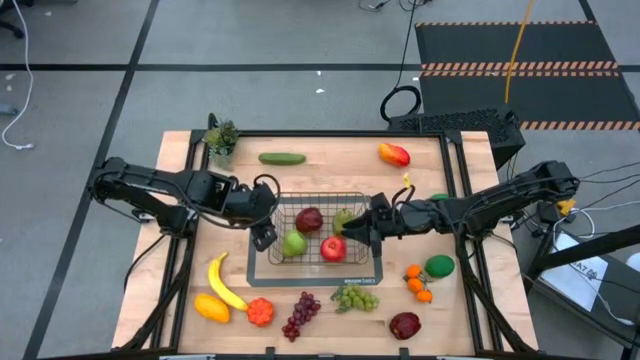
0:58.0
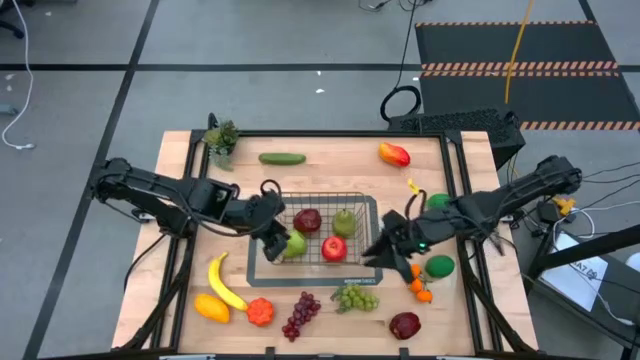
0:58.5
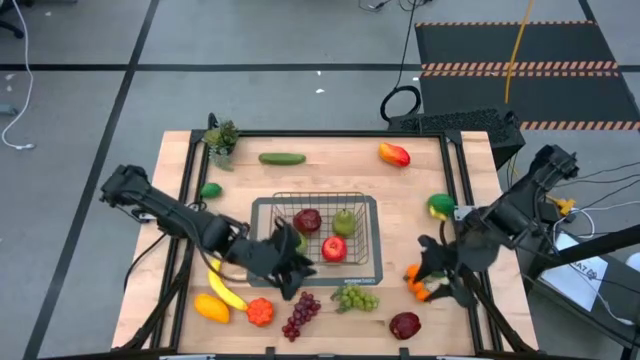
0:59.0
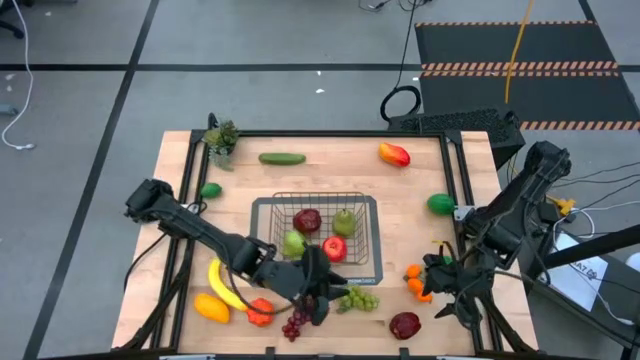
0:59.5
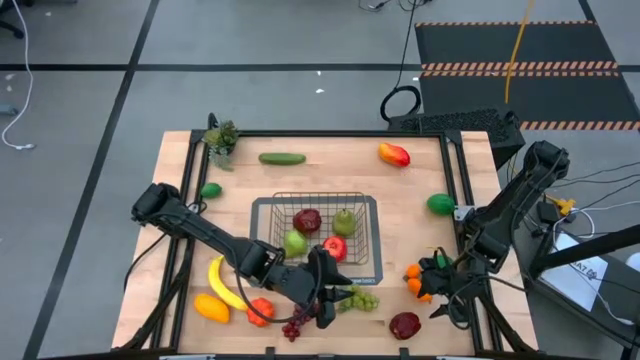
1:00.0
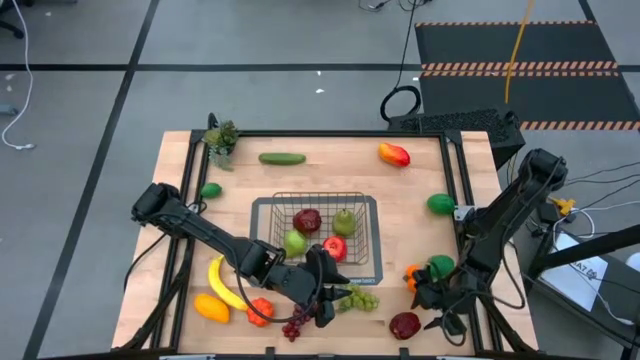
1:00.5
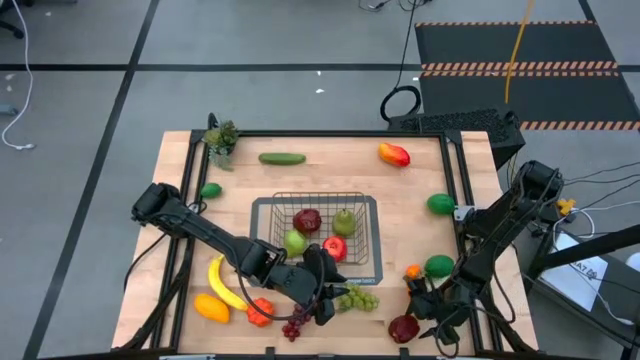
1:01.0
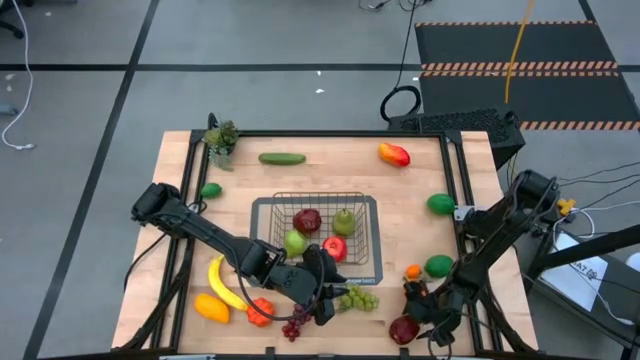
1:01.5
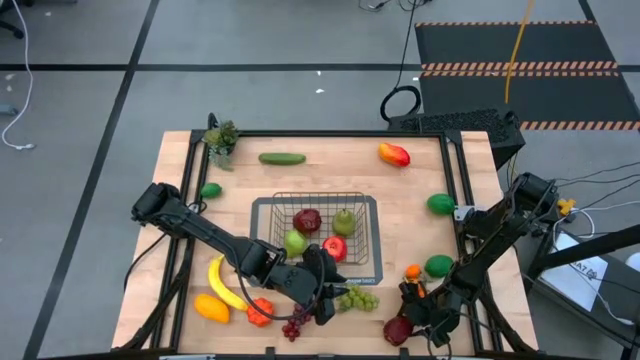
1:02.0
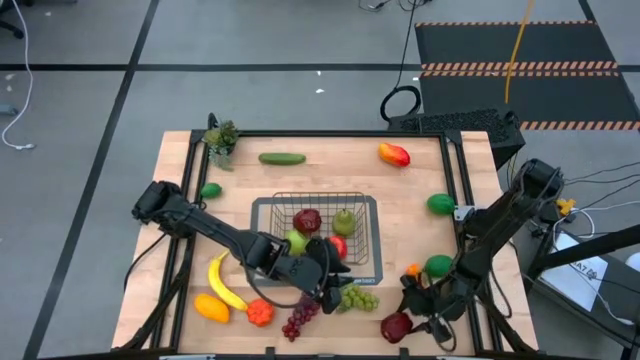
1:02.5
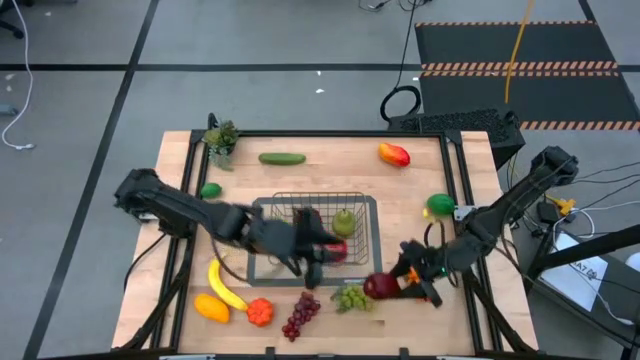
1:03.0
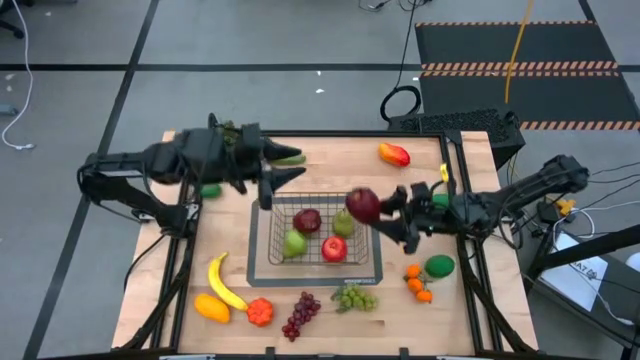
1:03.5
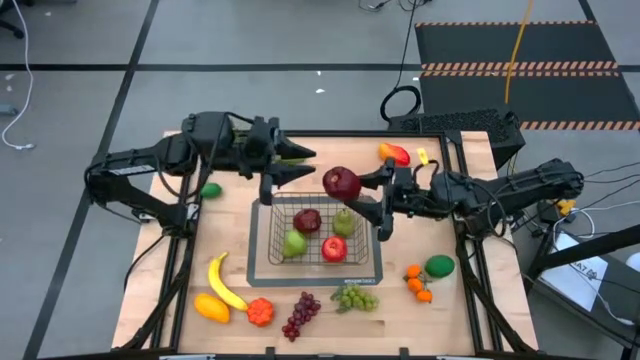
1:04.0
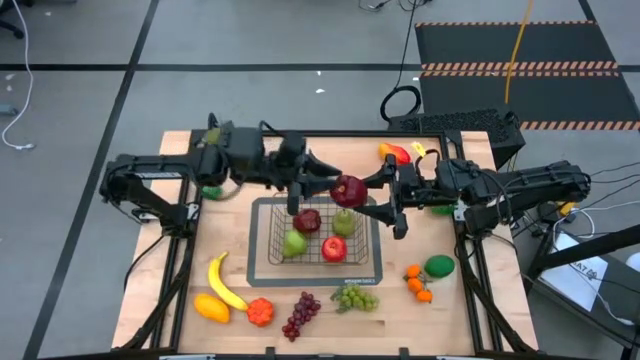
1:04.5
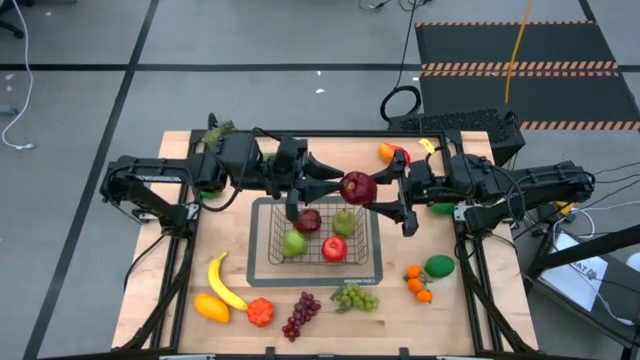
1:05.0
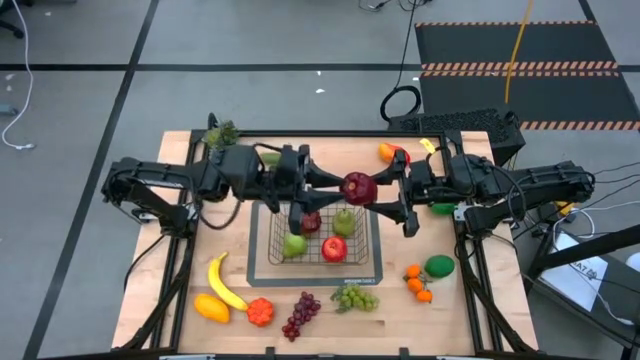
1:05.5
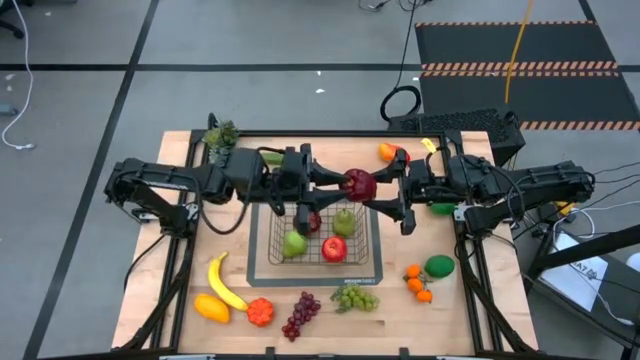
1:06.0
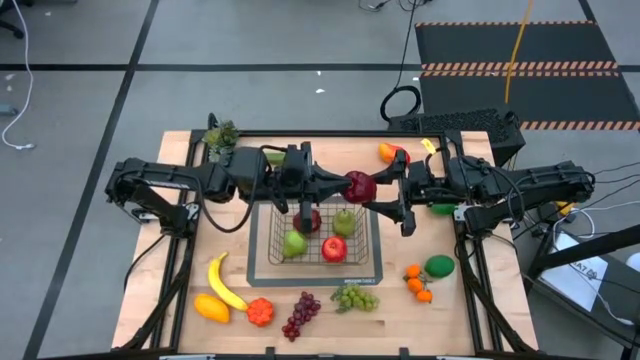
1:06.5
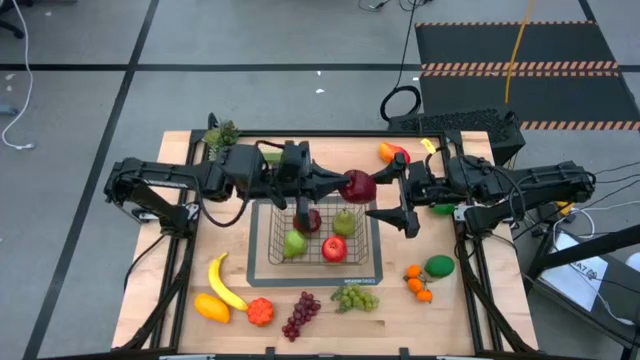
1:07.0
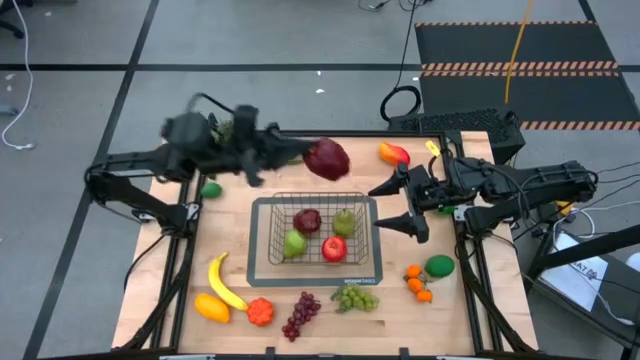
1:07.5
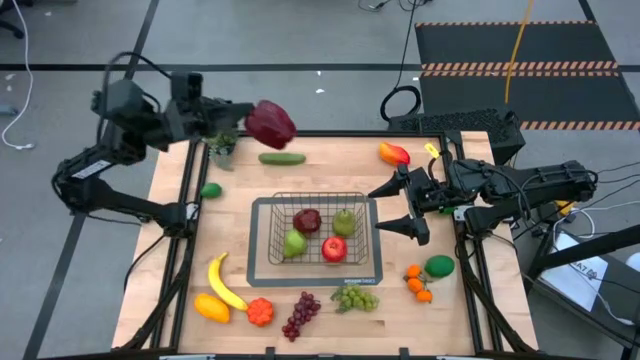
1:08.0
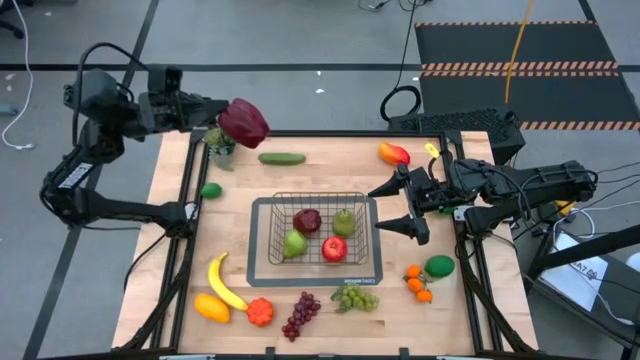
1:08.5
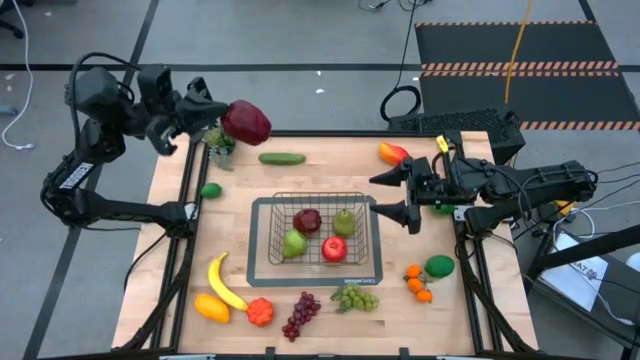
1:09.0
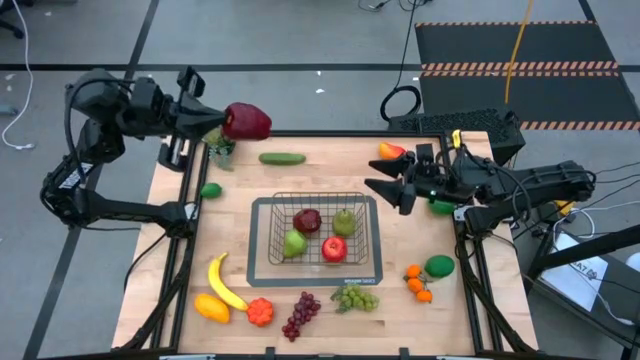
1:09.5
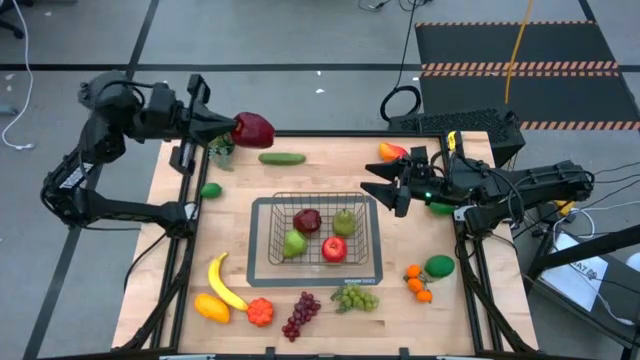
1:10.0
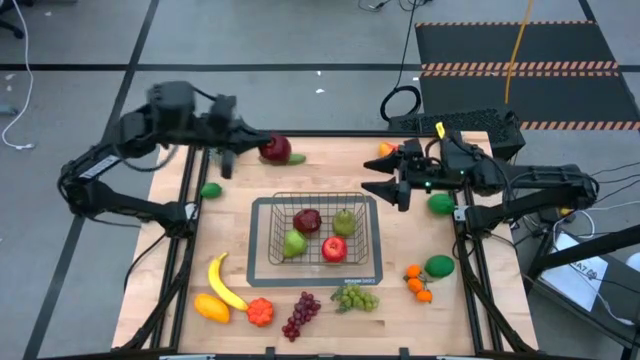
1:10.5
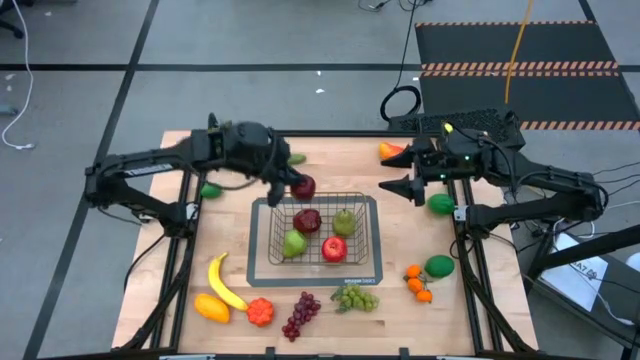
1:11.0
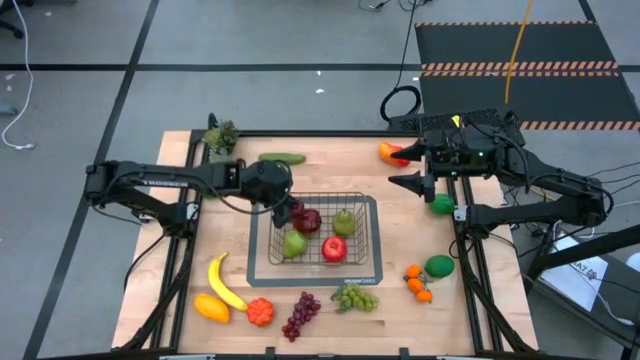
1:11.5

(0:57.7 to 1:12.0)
Task: Build produce basket
Put the dark red apple into the gold wire basket

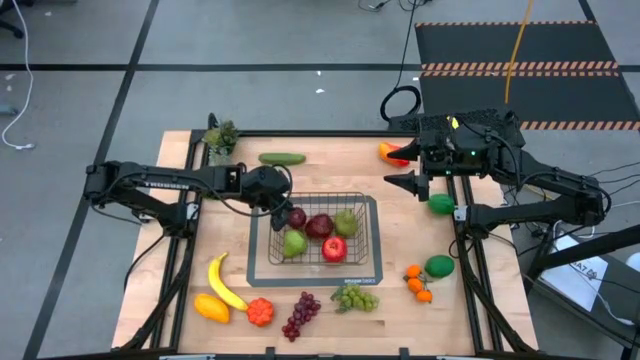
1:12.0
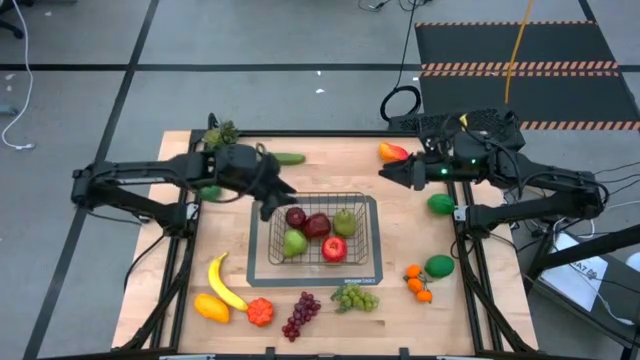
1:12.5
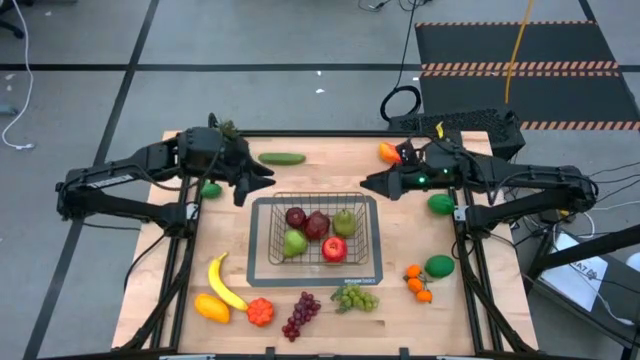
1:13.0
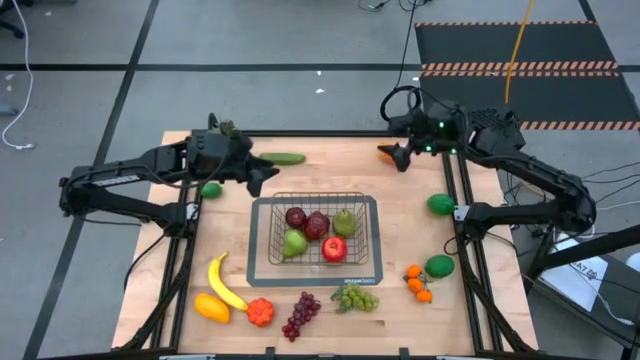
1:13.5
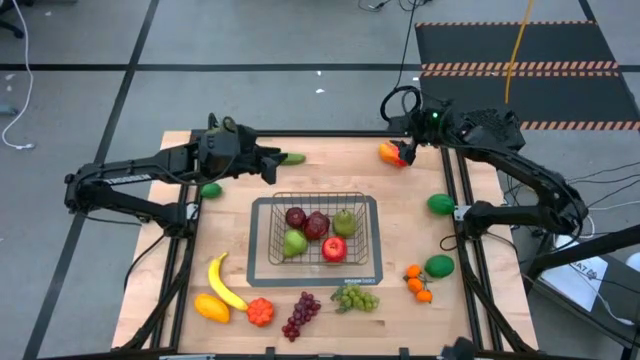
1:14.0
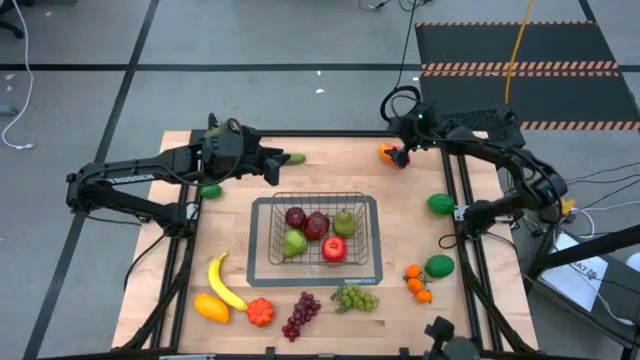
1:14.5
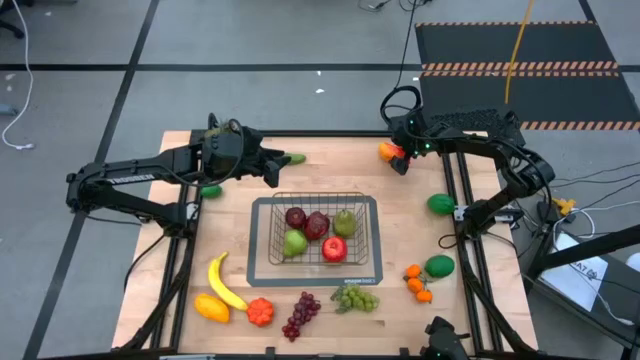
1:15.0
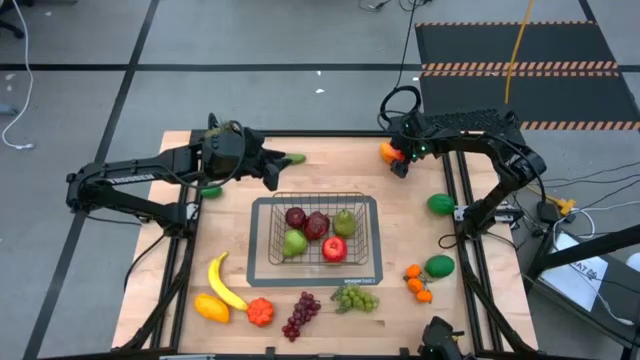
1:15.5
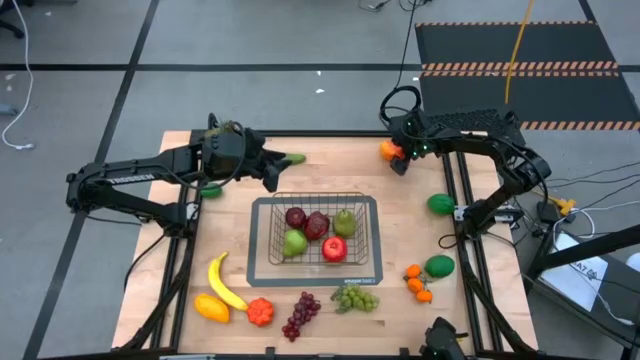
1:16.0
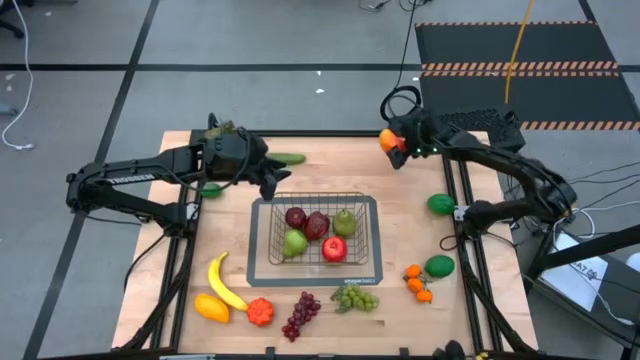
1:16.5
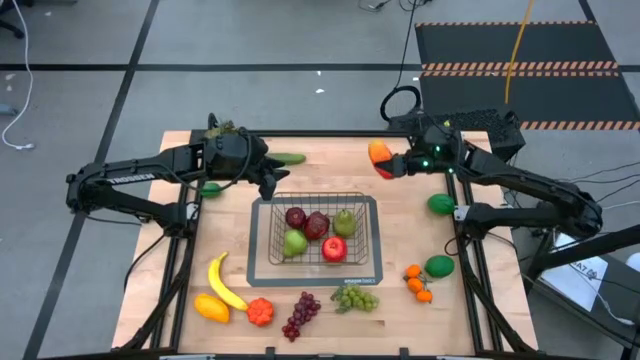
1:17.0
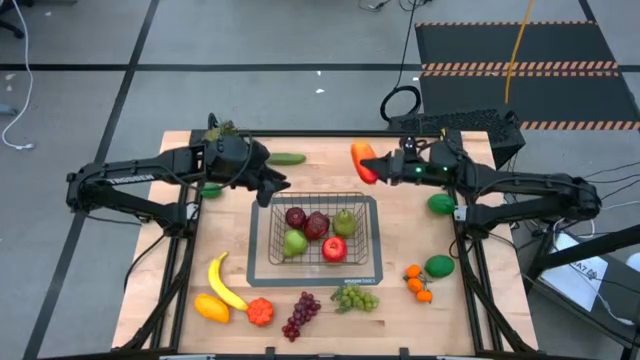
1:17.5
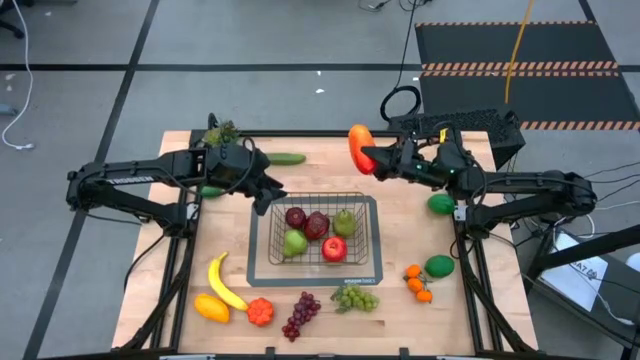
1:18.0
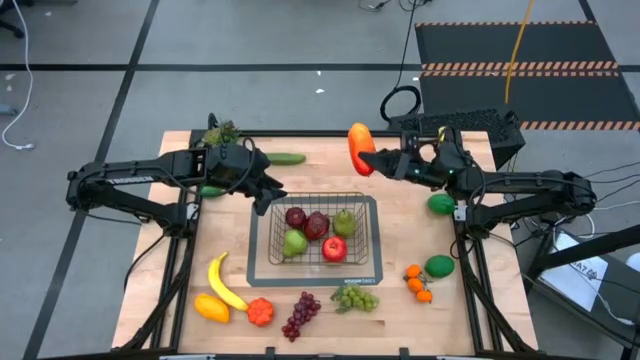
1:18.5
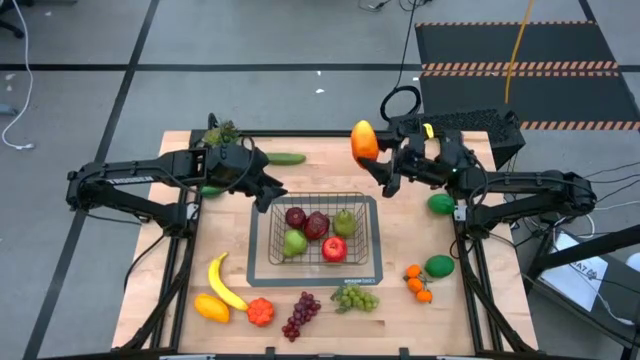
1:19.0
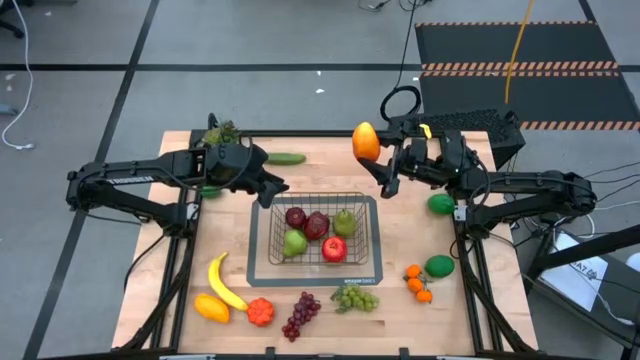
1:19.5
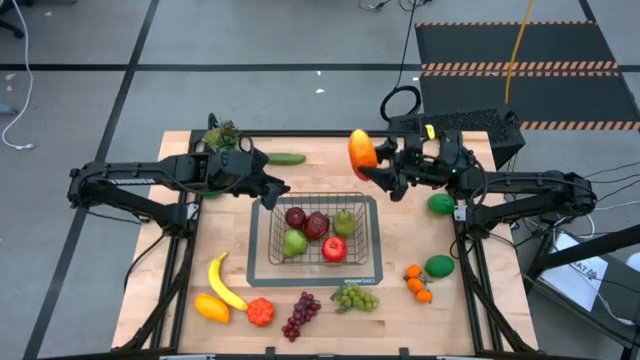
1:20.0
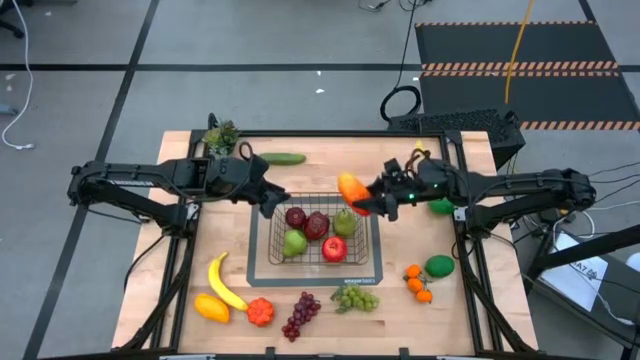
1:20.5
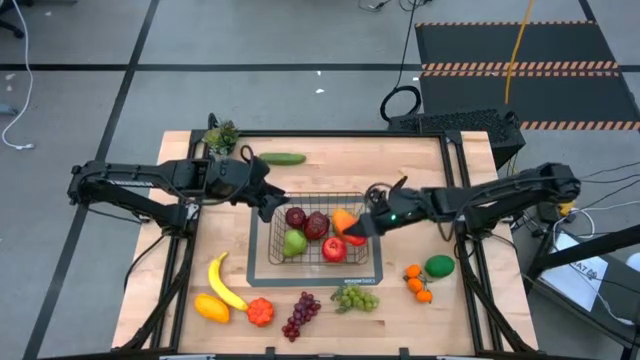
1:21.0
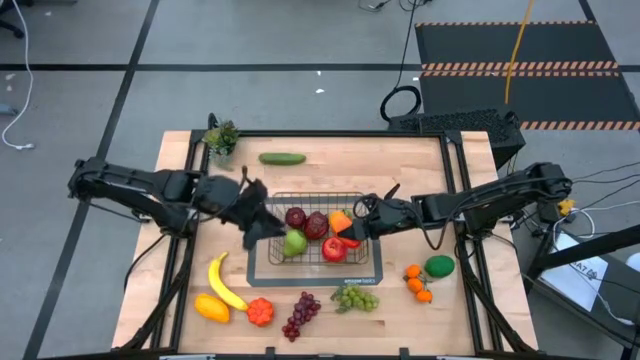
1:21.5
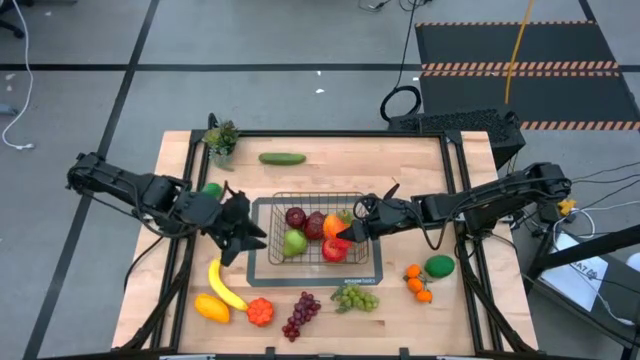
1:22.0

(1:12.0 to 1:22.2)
Put the top mango into the gold wire basket
